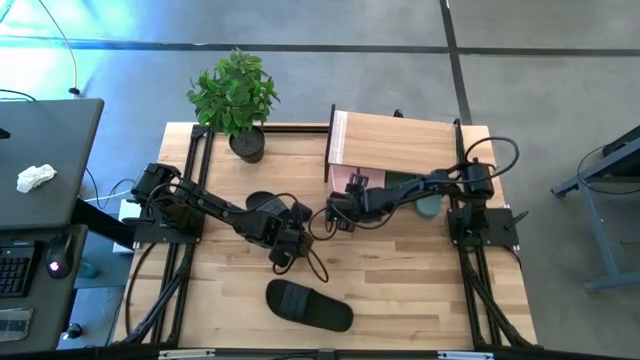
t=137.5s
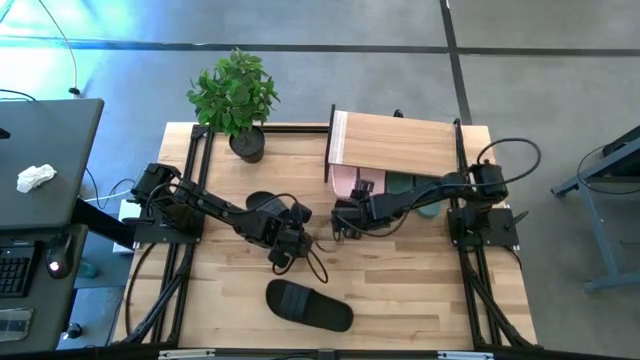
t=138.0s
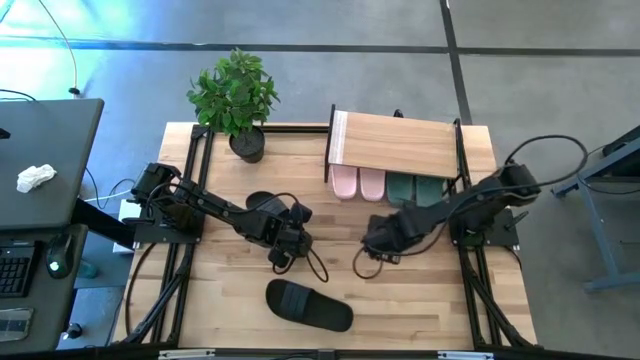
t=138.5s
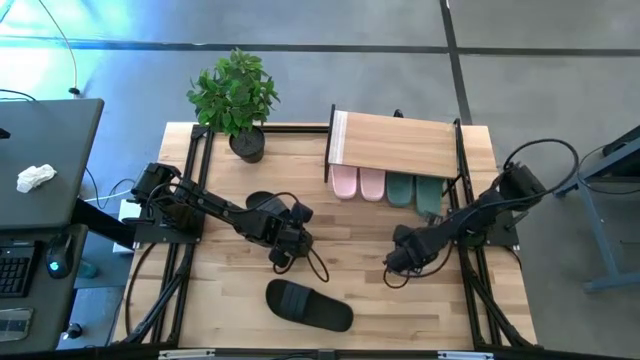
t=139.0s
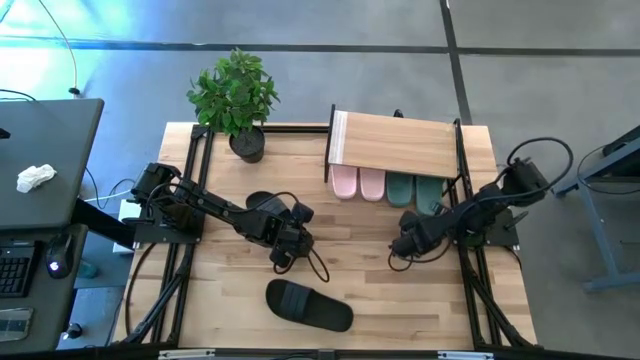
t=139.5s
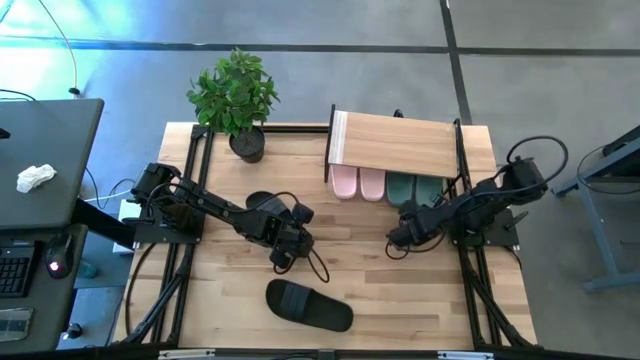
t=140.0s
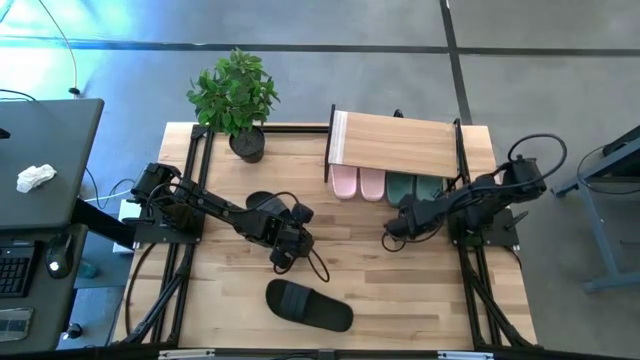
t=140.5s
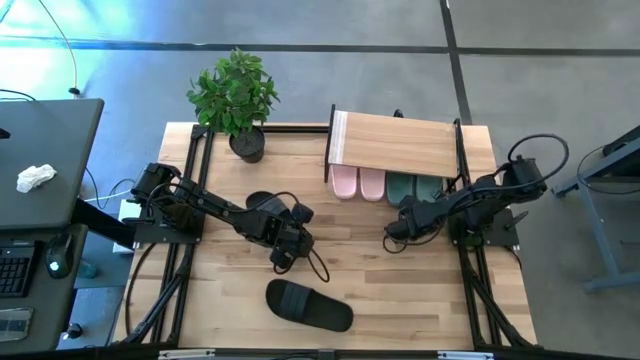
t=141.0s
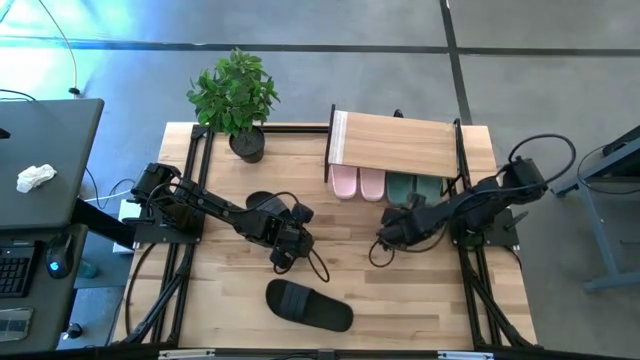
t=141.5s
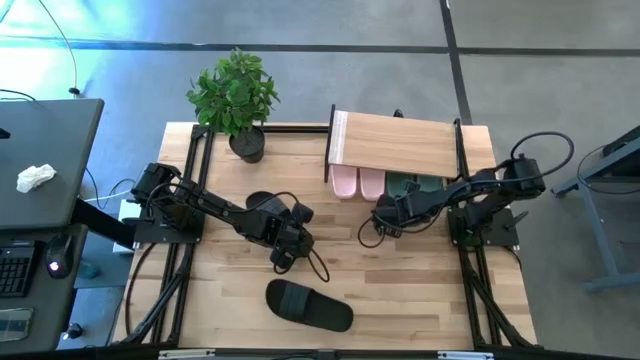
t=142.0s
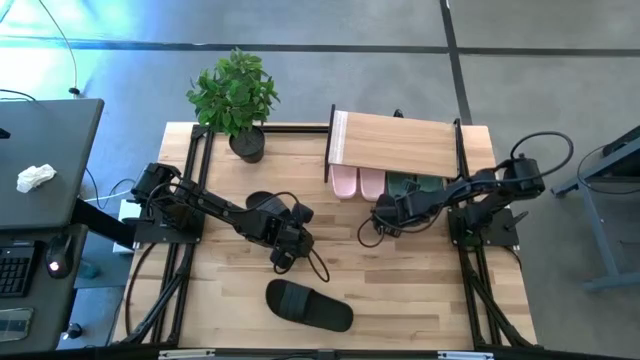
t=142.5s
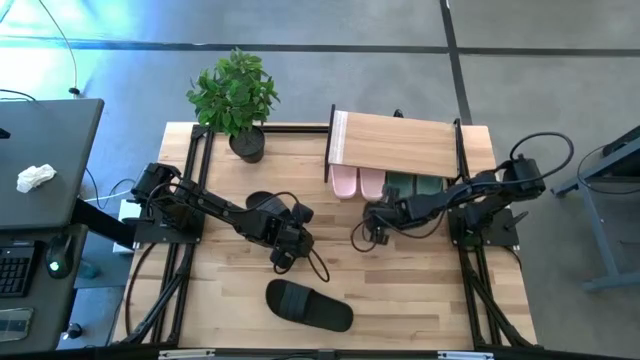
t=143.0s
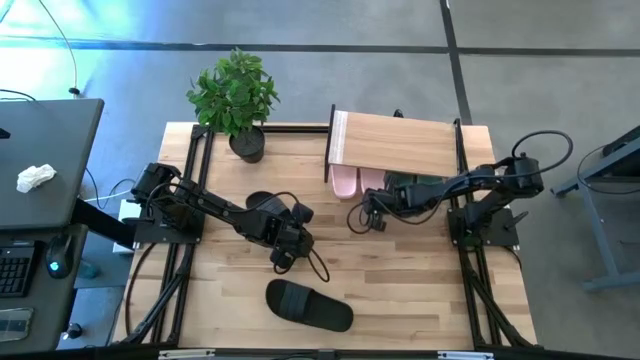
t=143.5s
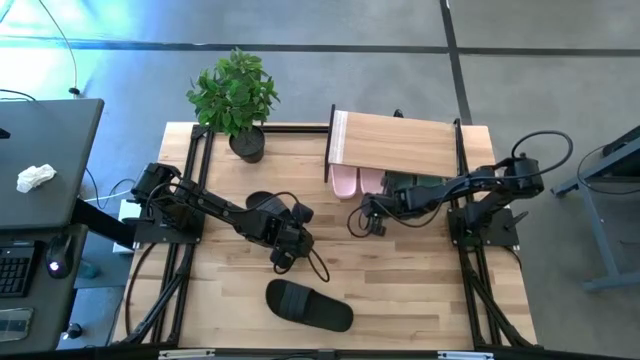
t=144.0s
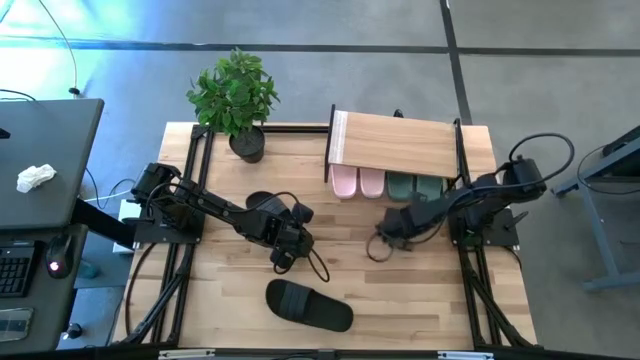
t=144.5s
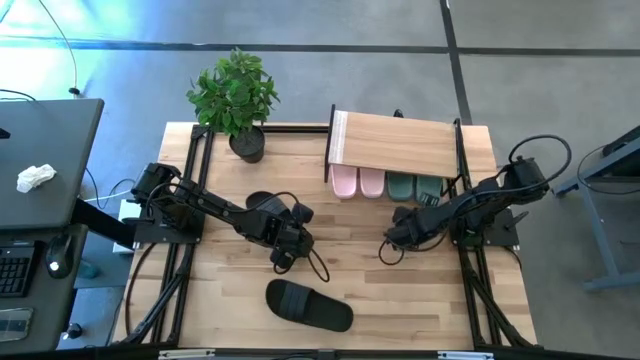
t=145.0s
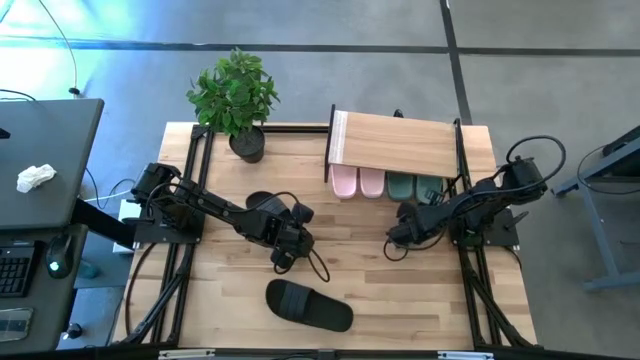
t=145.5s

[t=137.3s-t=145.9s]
Task: Pick and place slides into the shelf
Adjust the slides under the shelf

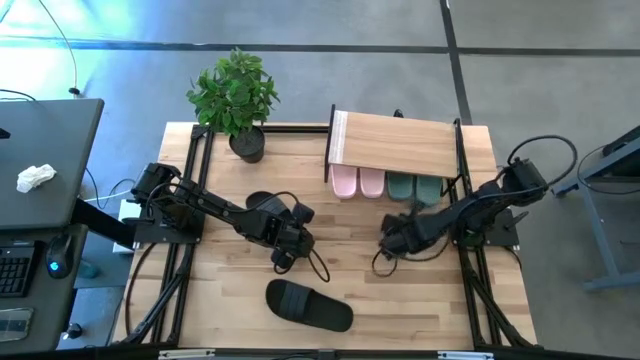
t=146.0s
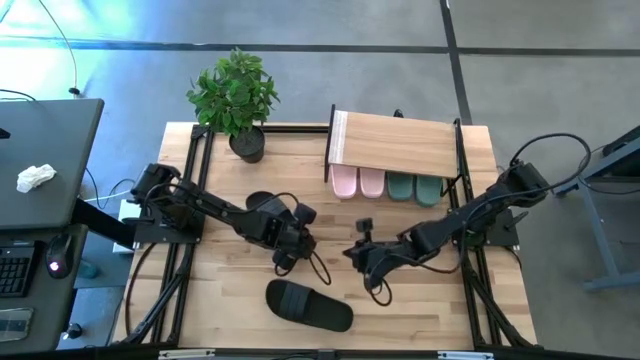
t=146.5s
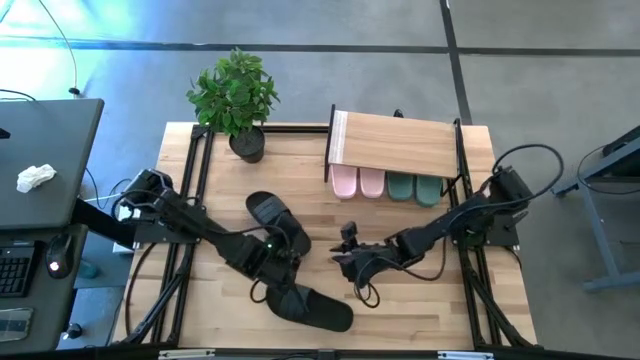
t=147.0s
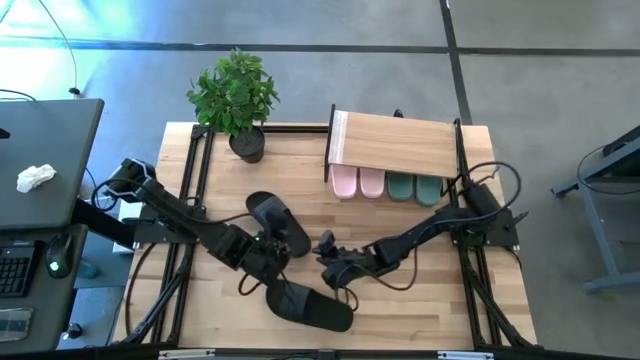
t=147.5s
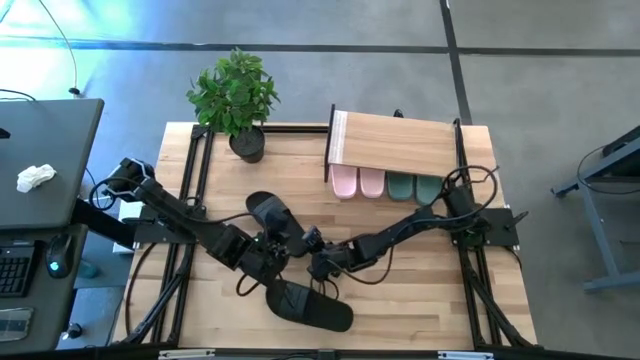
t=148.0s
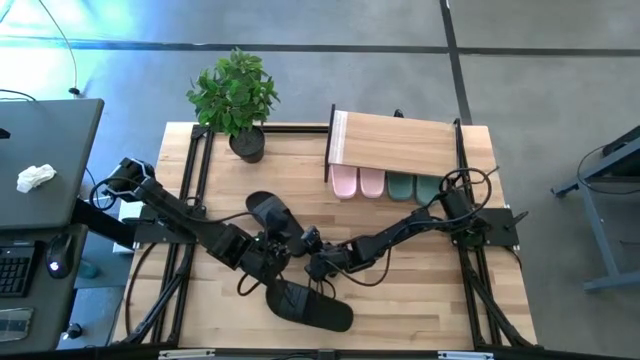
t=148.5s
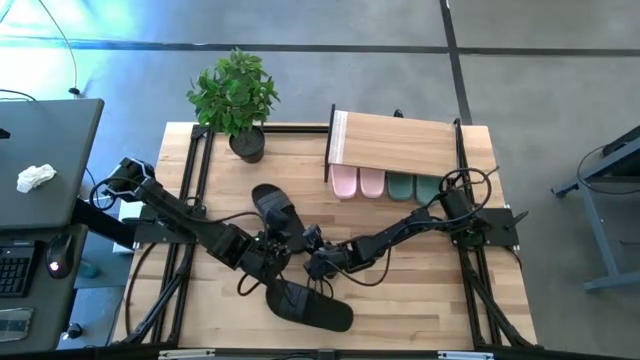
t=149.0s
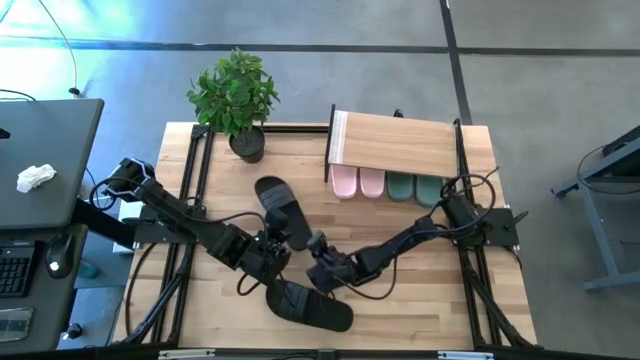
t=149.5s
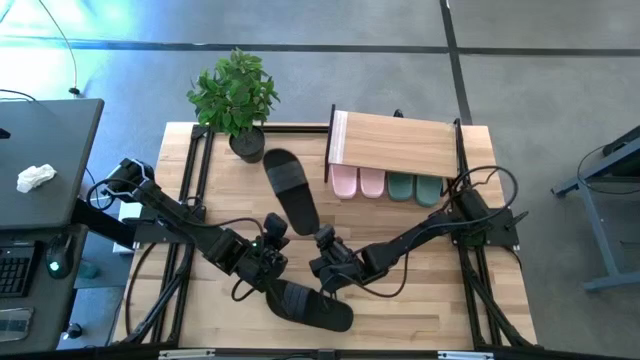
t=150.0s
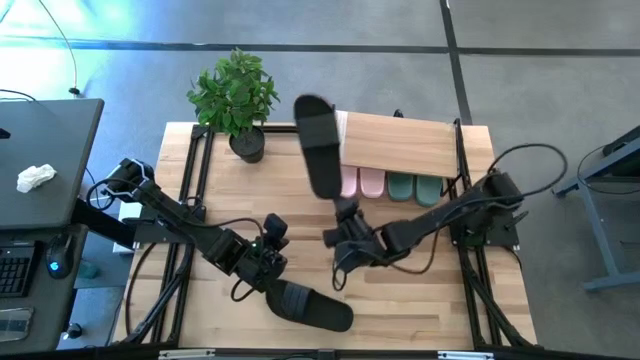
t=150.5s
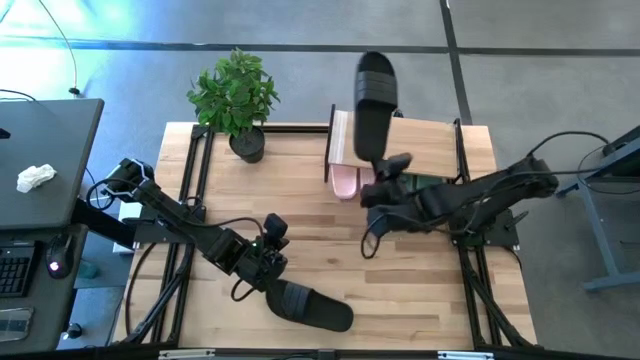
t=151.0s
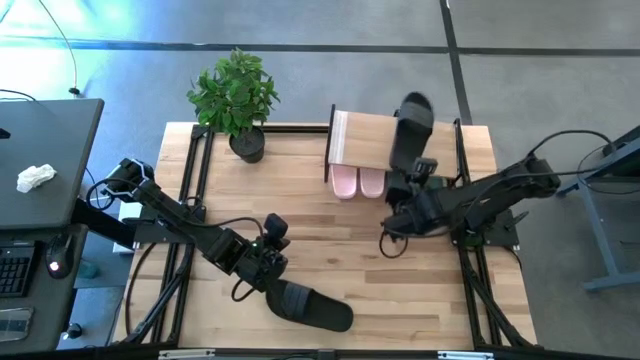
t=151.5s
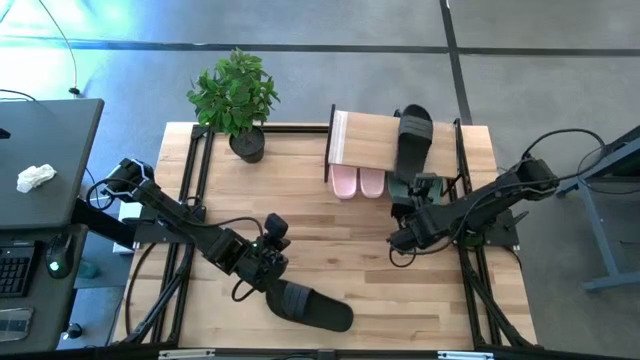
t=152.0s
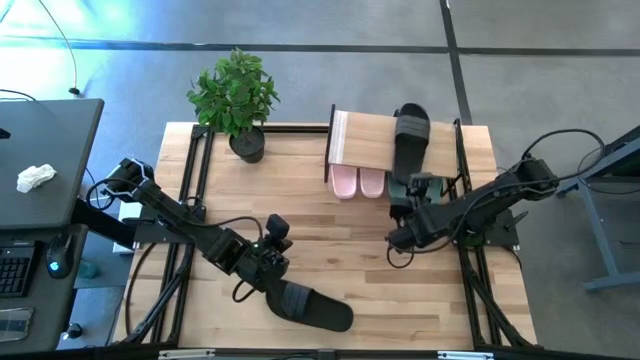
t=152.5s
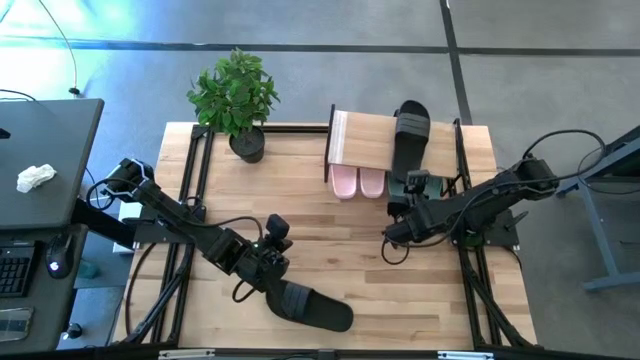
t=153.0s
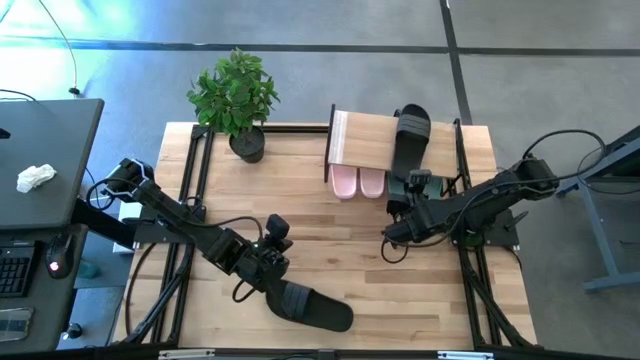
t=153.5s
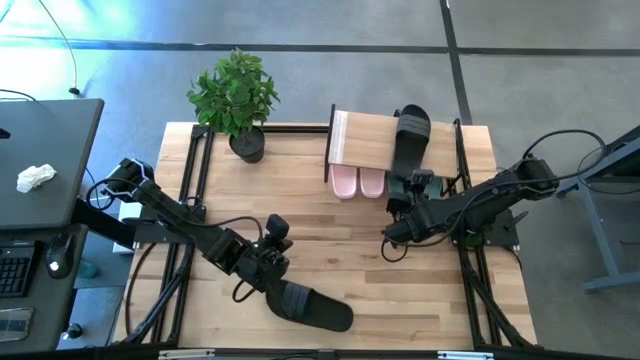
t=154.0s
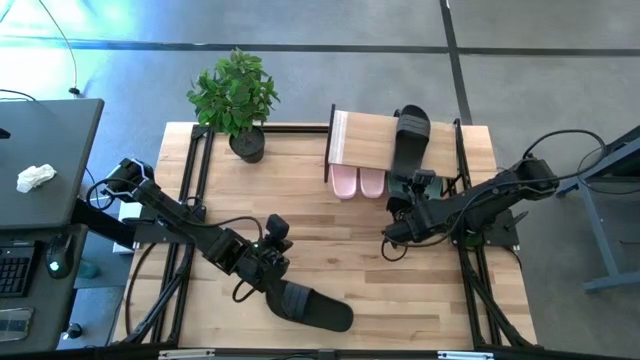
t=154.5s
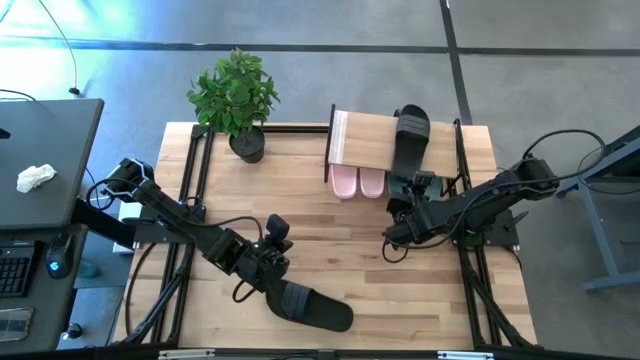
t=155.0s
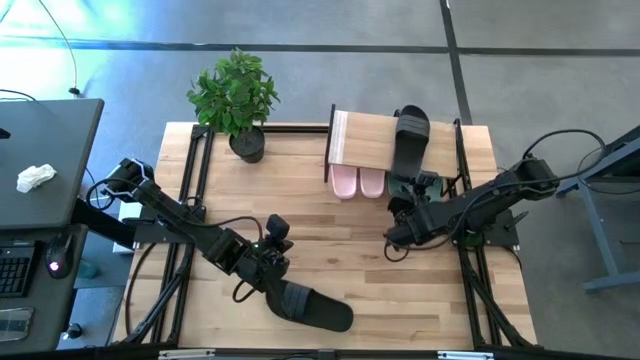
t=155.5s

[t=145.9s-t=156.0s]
Put the top black slide on the shelf

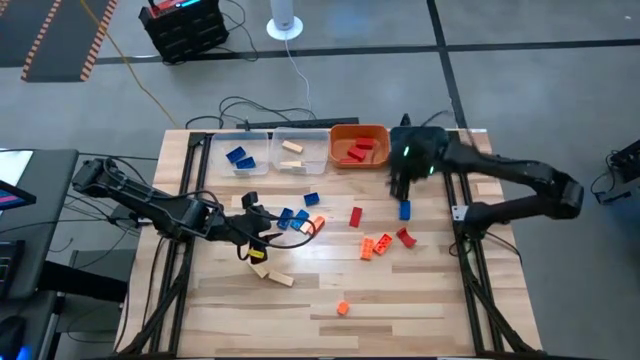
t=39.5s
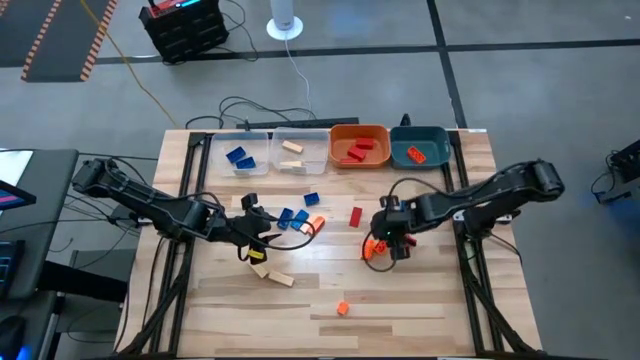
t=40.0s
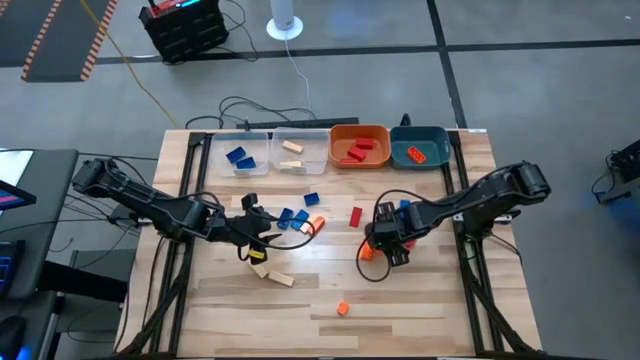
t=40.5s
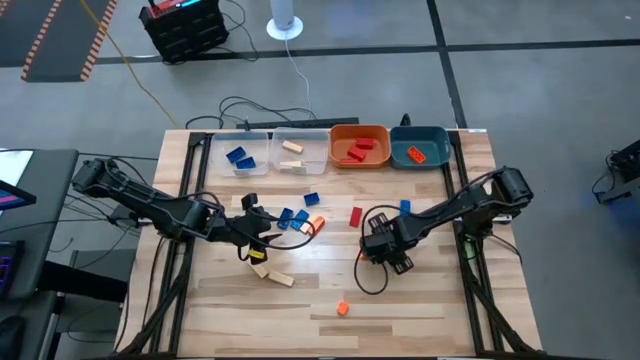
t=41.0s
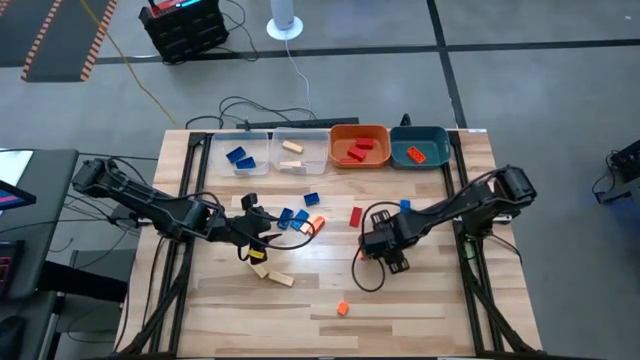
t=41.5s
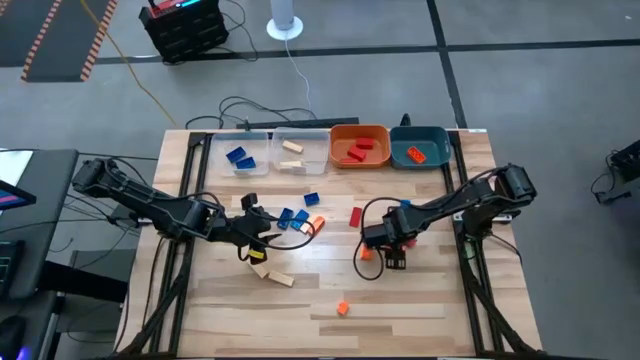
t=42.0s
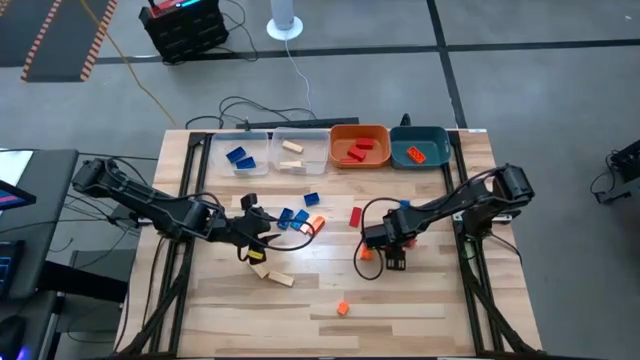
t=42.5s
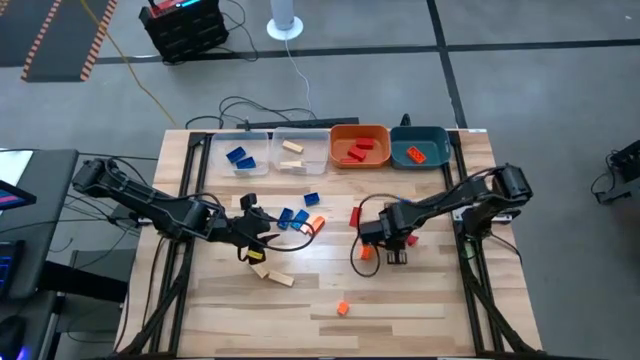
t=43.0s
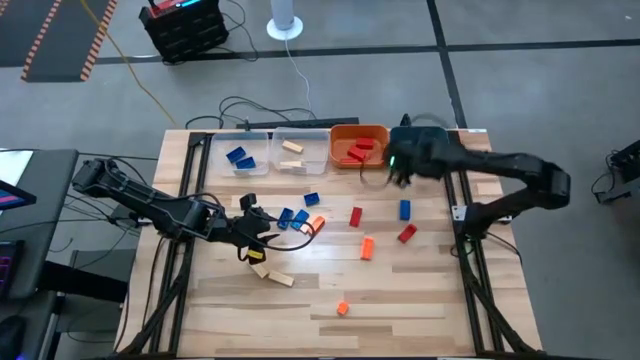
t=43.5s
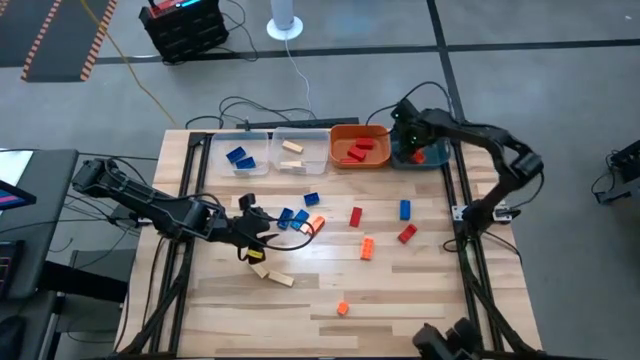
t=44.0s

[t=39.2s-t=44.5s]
Task: Sort blocks
Put the orange game piece into the blue bin
